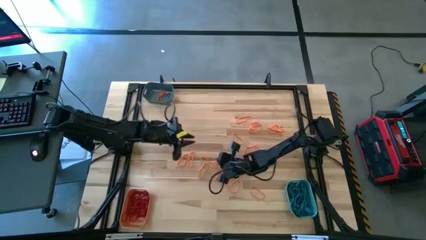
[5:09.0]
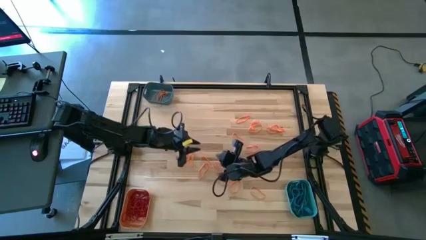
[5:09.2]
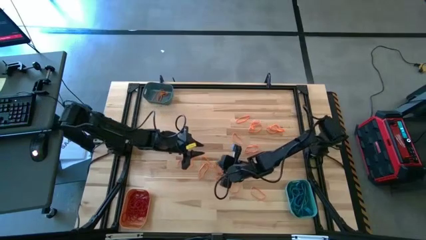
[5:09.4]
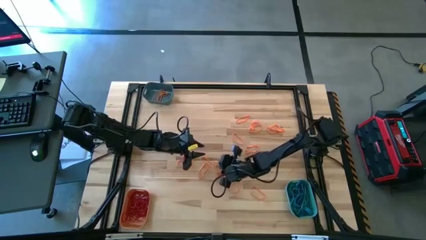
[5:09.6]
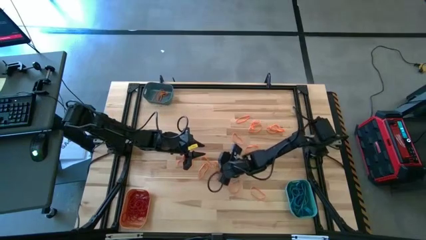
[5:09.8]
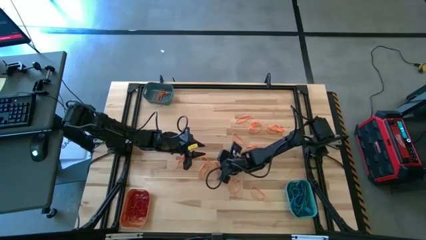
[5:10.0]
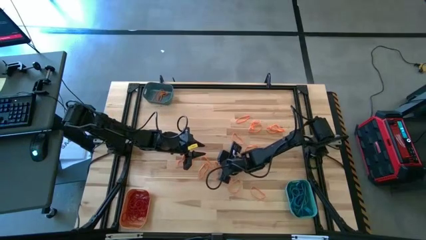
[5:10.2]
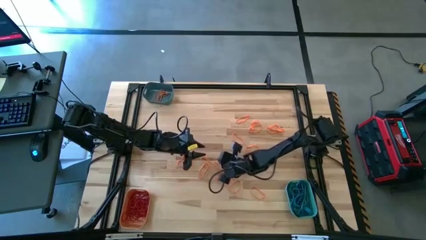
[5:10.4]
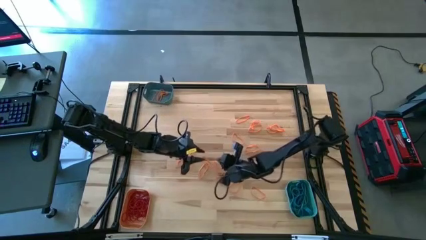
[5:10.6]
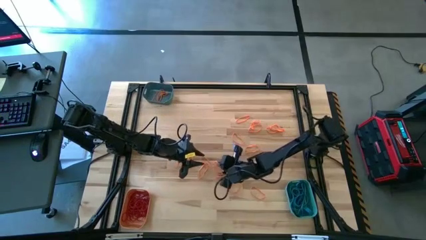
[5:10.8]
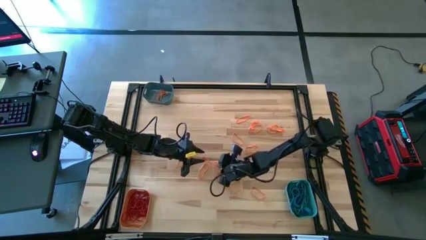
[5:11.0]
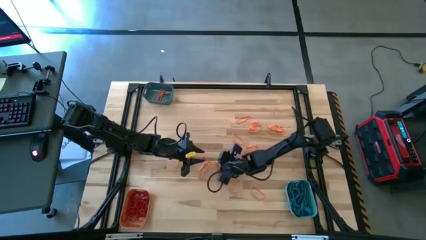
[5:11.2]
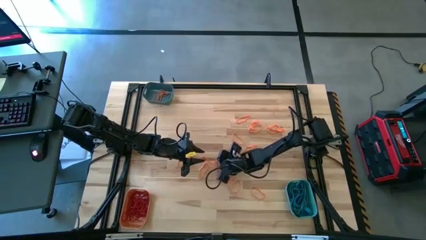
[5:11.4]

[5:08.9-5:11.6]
Task: Sort rubber bands into baskets
Put the orange rubber band into the blue bin

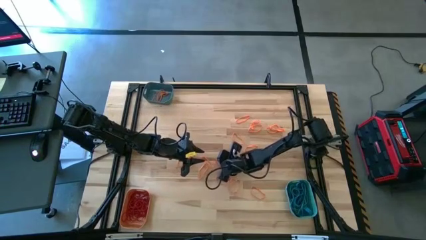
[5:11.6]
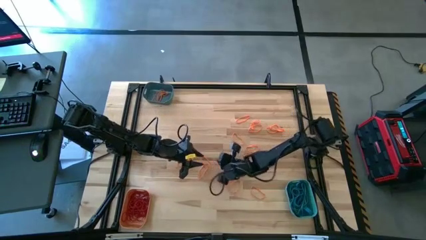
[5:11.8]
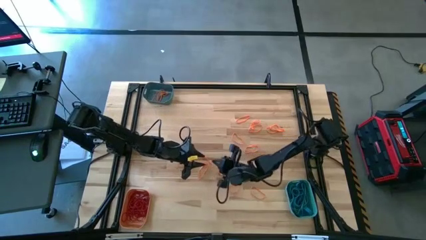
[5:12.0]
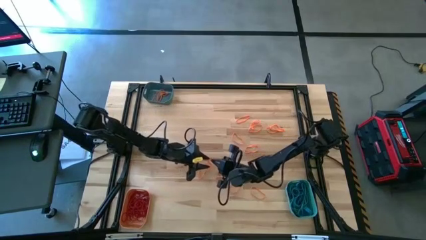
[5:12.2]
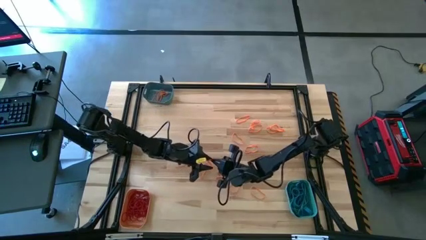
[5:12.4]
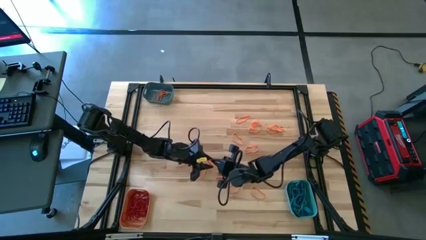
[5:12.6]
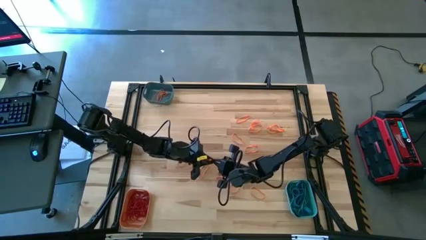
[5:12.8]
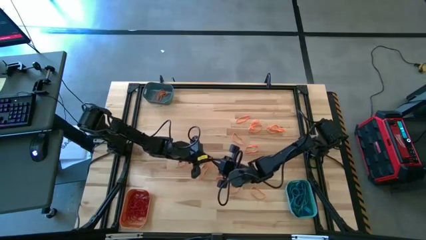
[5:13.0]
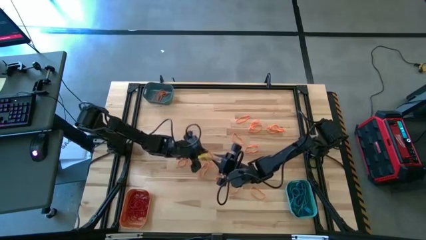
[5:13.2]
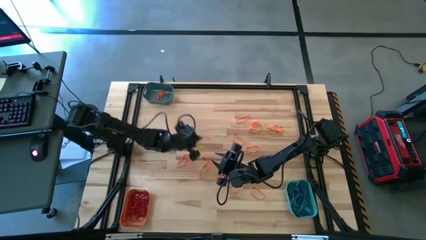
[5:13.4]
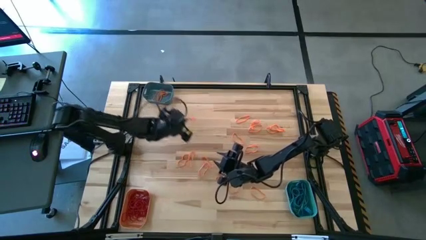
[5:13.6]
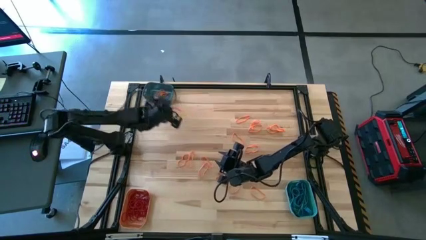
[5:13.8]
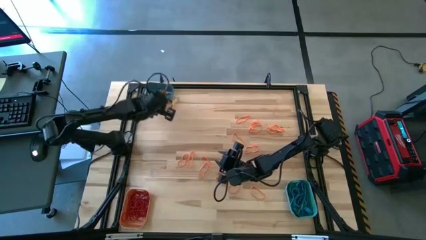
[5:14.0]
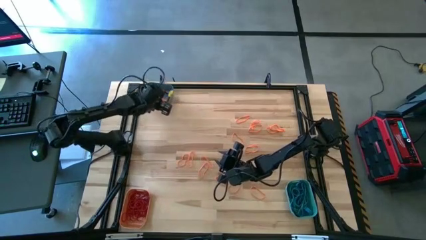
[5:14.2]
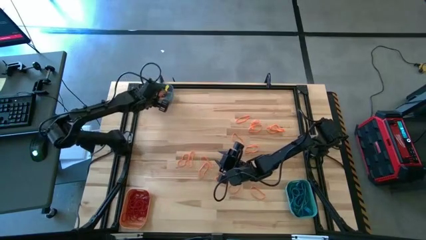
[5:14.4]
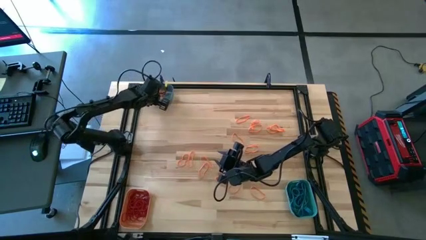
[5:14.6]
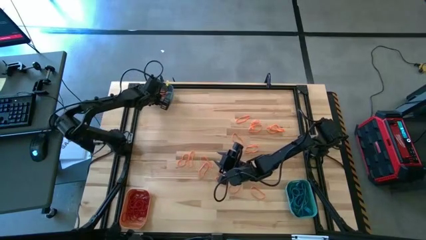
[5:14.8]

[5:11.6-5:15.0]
Put the orange rubber band into the blue bin

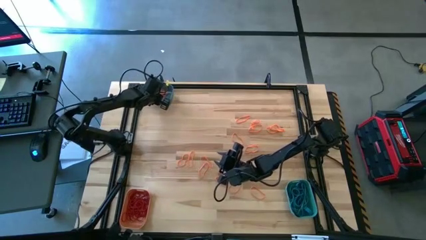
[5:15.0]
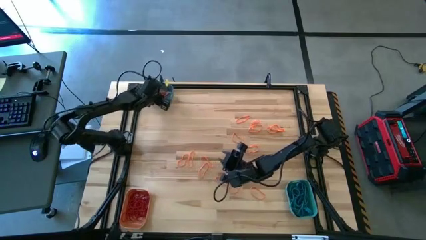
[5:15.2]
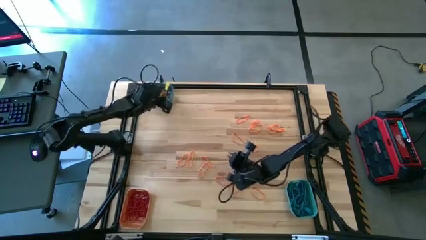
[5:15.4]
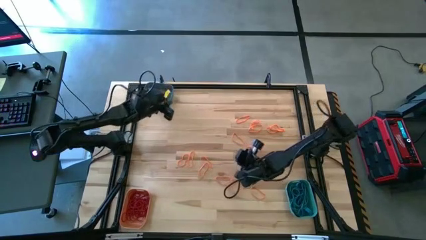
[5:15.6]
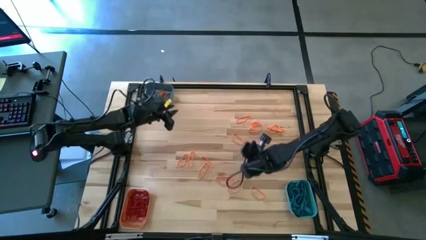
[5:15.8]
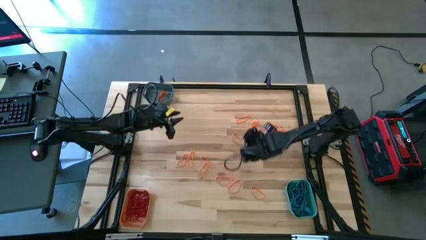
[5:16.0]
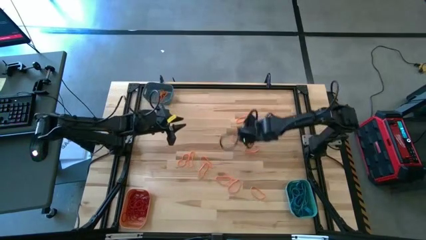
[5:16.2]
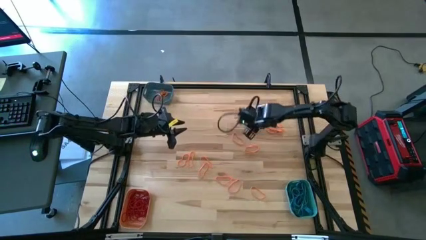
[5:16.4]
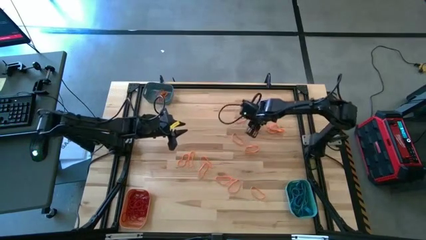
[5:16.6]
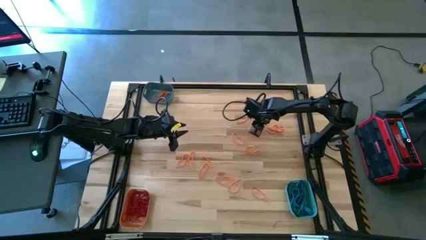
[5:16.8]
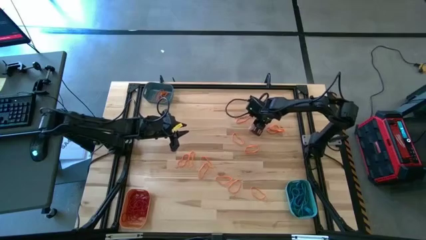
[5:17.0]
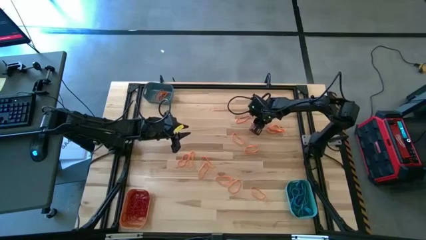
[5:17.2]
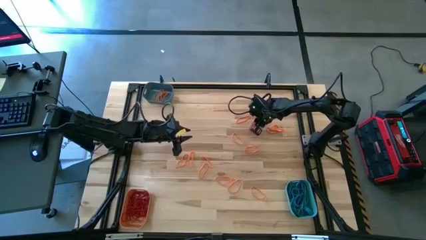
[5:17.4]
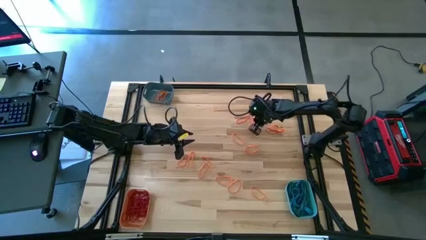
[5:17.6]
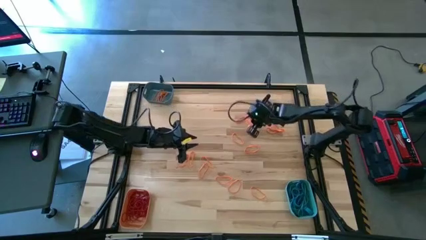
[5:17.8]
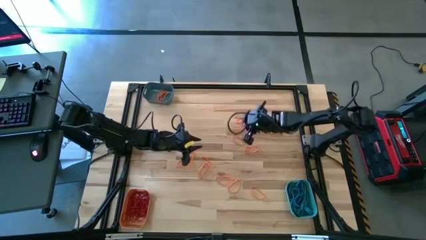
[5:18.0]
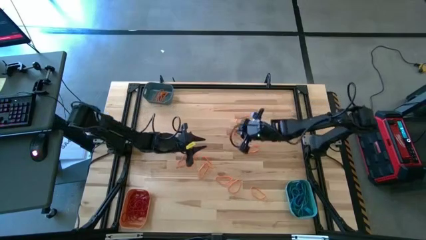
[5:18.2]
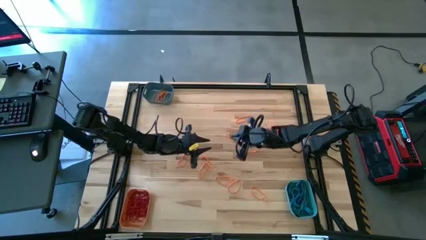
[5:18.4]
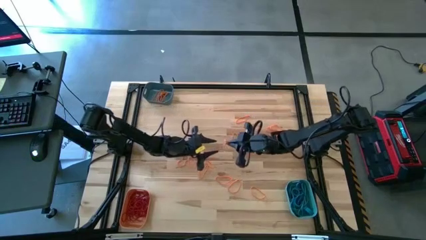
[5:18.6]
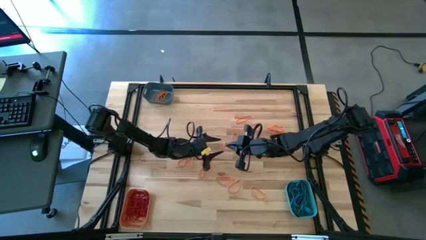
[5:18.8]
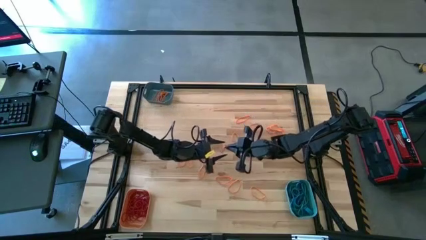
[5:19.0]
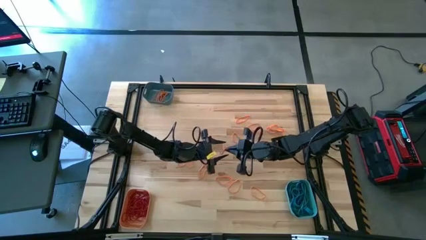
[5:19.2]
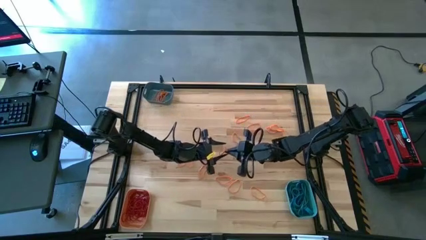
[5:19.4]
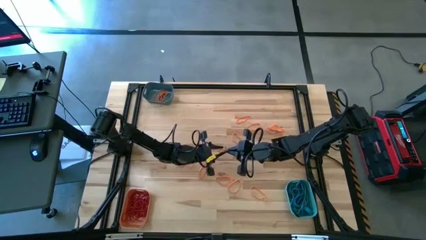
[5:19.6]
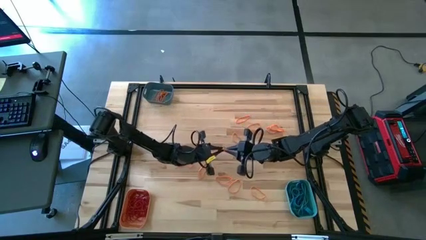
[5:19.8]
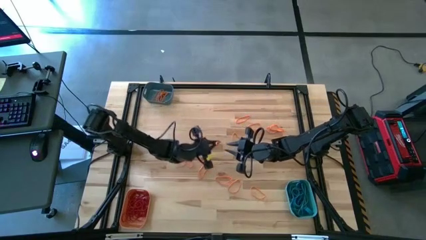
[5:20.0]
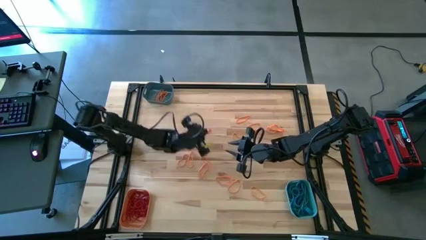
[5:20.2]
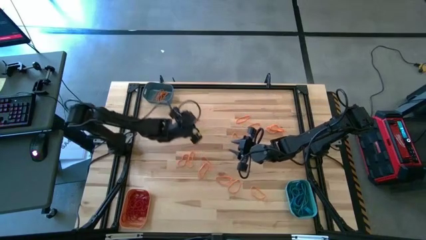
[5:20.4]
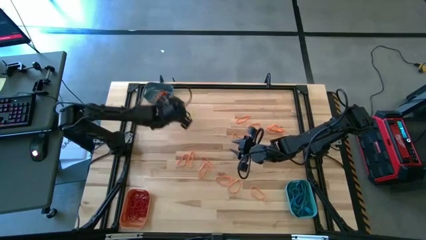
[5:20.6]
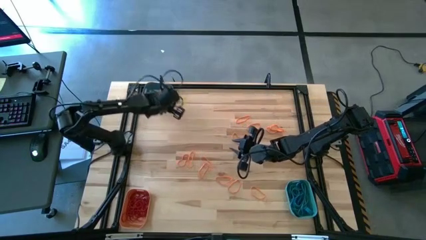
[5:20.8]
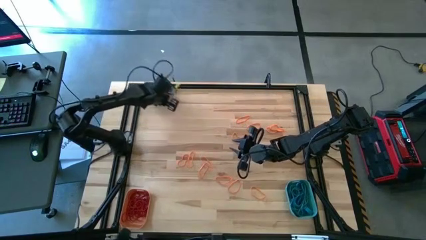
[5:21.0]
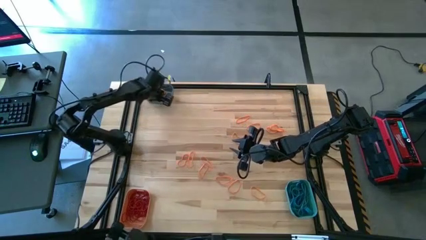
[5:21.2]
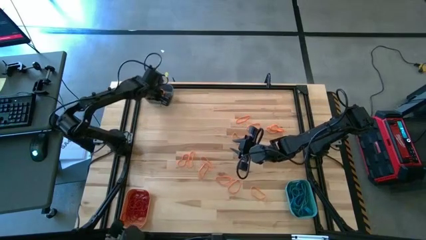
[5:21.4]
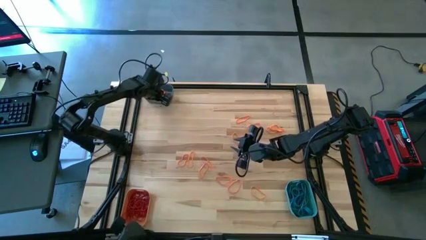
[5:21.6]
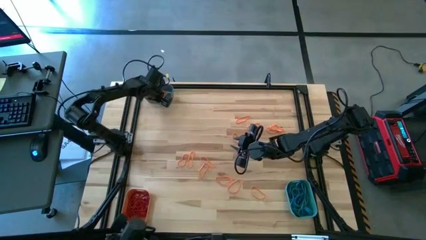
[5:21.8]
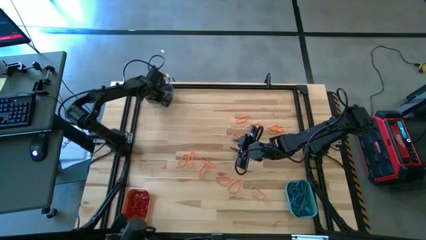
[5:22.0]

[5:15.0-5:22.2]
Put the orange rubber band into the blue bin

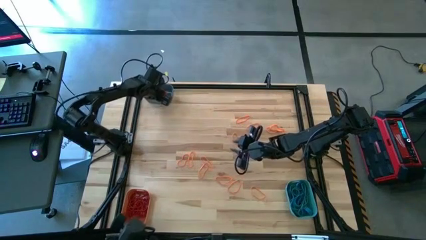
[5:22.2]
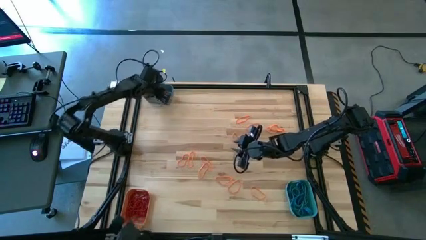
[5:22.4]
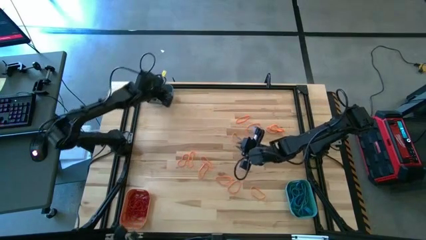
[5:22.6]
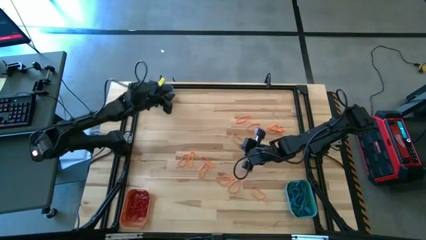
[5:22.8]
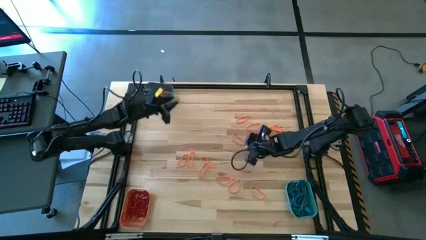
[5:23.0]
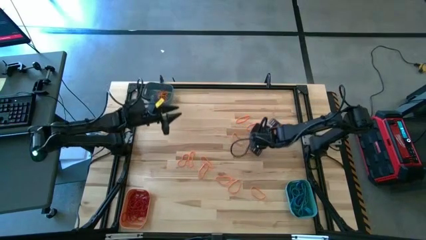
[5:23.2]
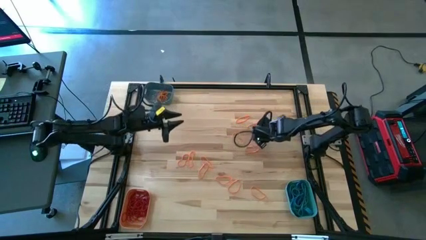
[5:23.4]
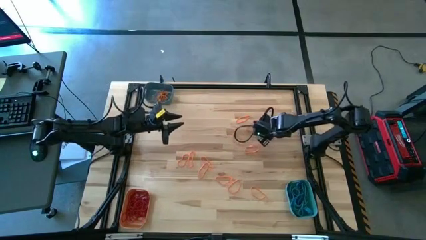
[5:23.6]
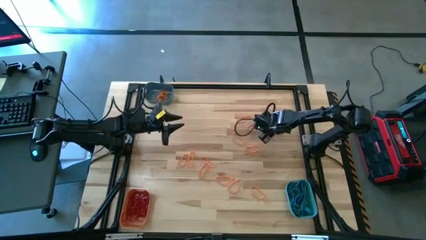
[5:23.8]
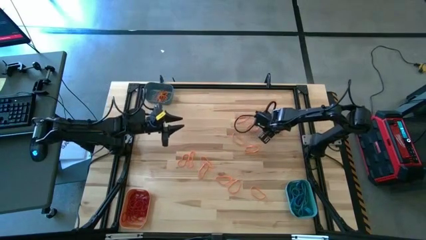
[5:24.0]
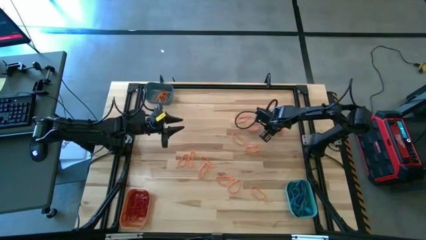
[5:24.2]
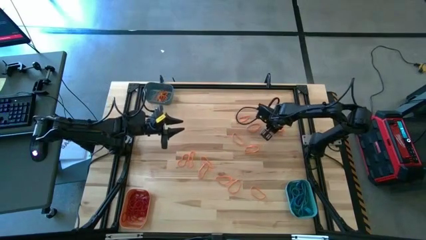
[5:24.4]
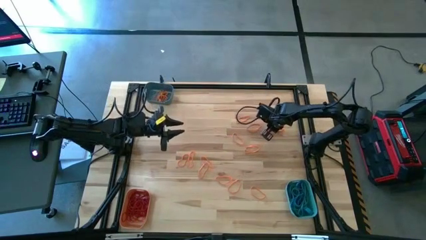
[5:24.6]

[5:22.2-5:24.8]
Put the orange rubber band into the blue bin

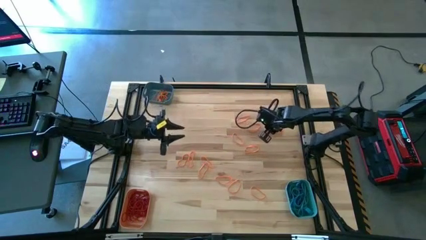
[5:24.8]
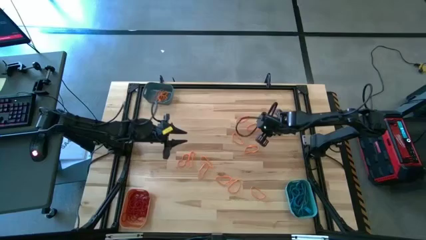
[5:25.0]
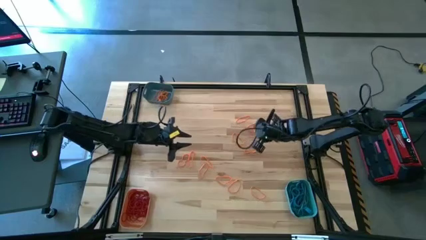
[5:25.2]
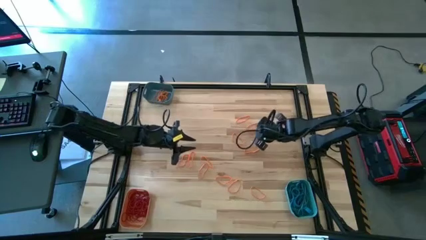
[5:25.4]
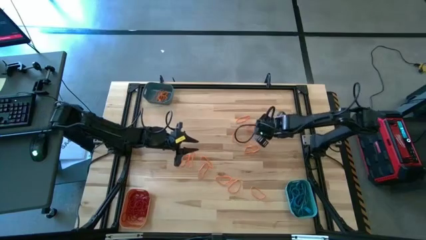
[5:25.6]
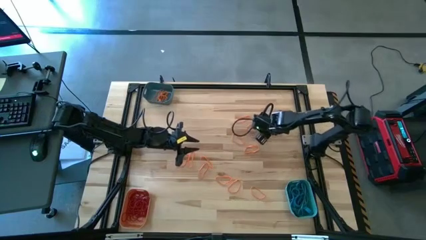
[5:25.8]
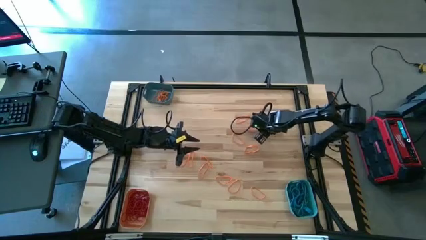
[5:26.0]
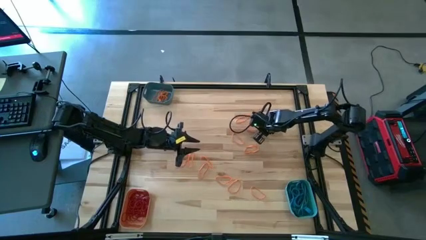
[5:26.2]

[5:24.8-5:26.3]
Put the orange rubber band into the blue bin
